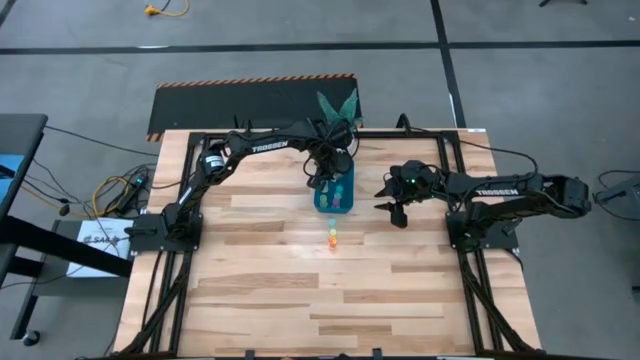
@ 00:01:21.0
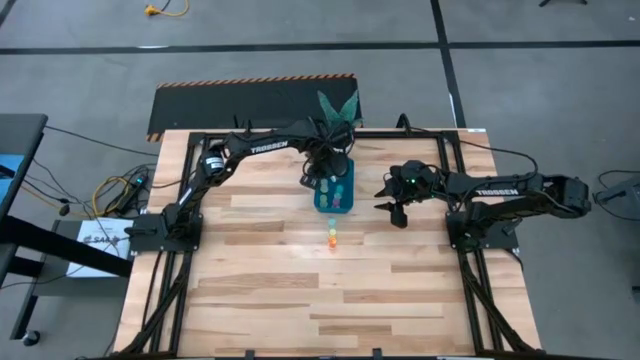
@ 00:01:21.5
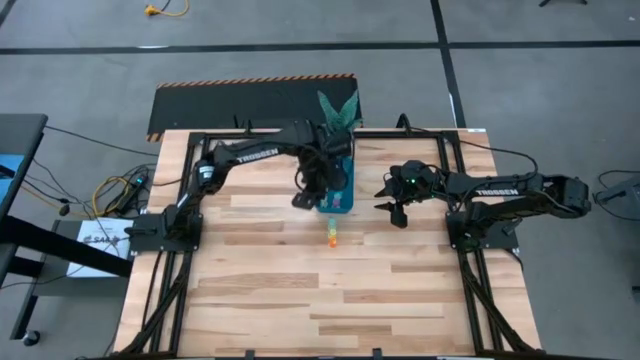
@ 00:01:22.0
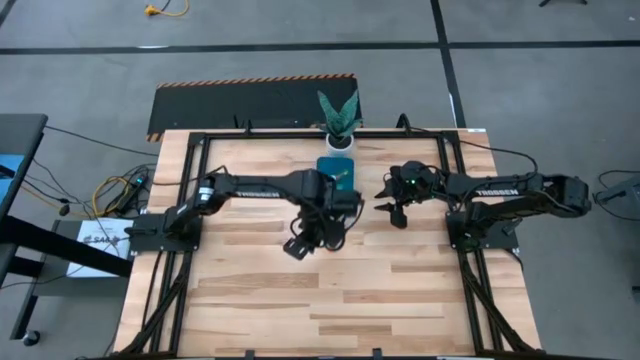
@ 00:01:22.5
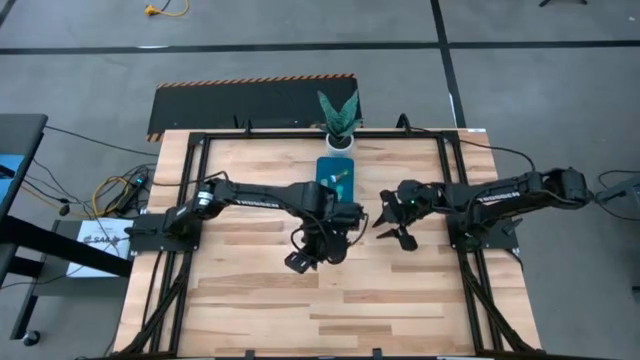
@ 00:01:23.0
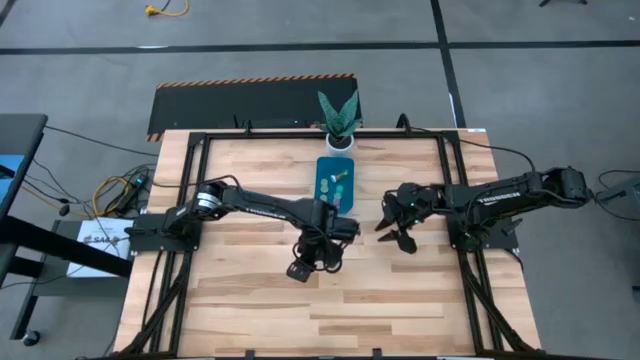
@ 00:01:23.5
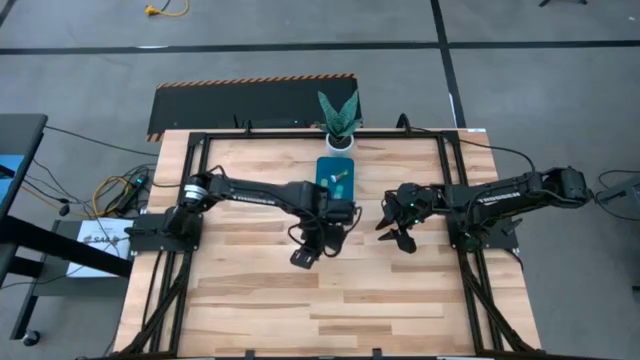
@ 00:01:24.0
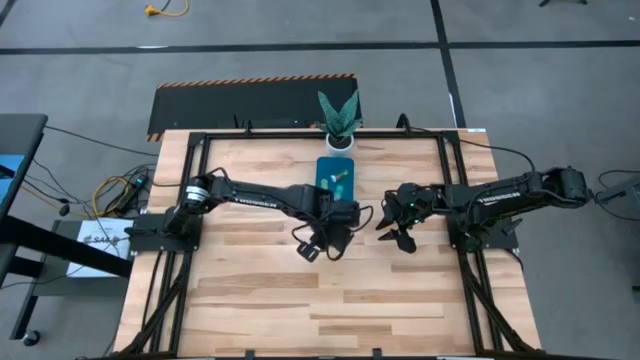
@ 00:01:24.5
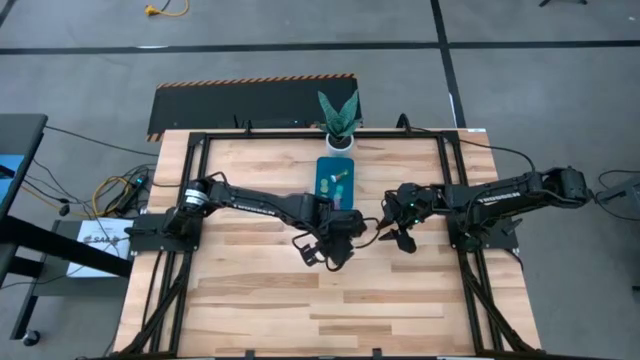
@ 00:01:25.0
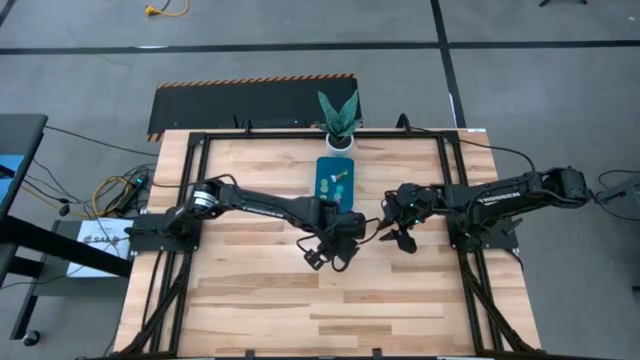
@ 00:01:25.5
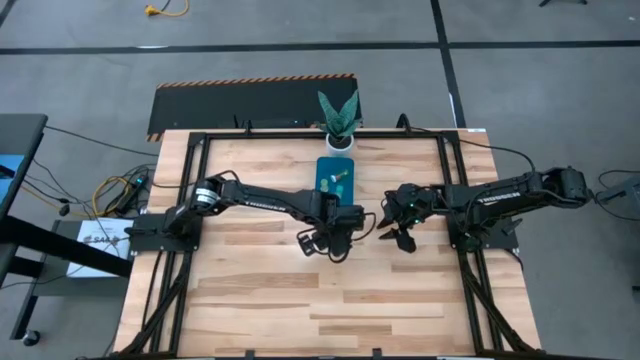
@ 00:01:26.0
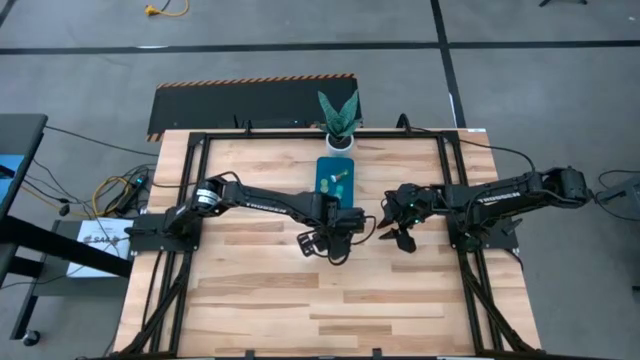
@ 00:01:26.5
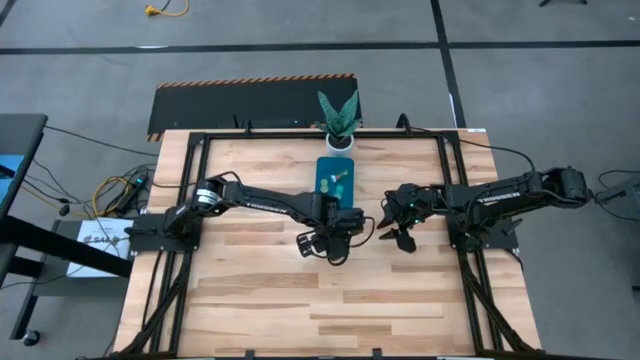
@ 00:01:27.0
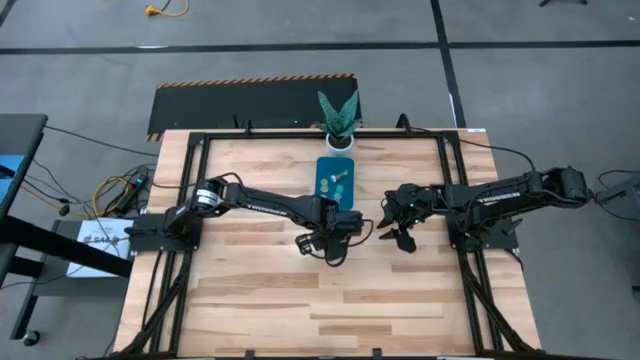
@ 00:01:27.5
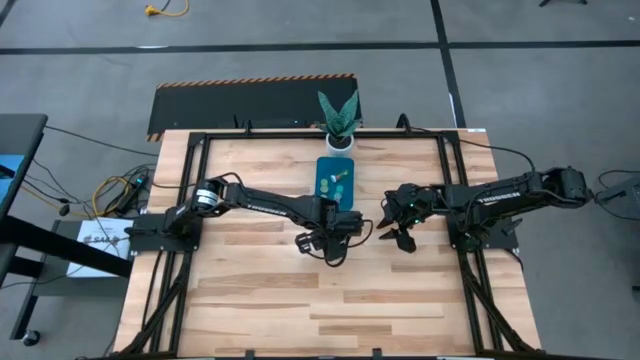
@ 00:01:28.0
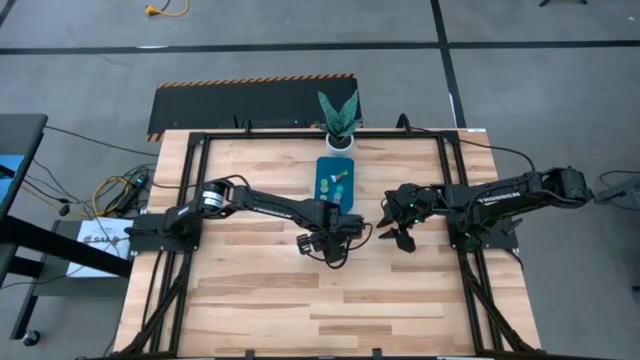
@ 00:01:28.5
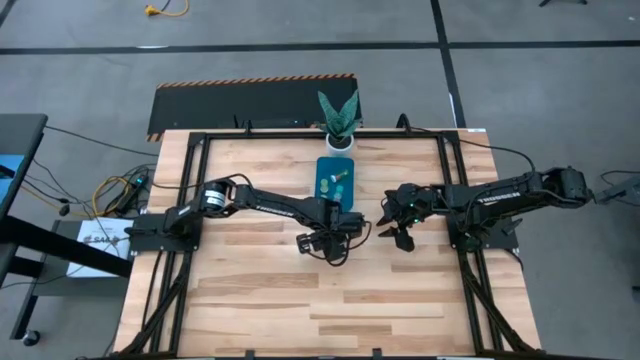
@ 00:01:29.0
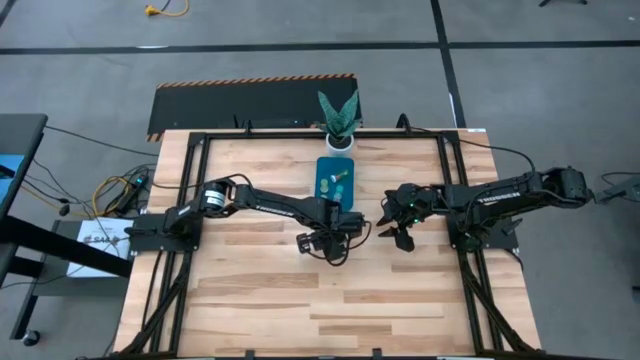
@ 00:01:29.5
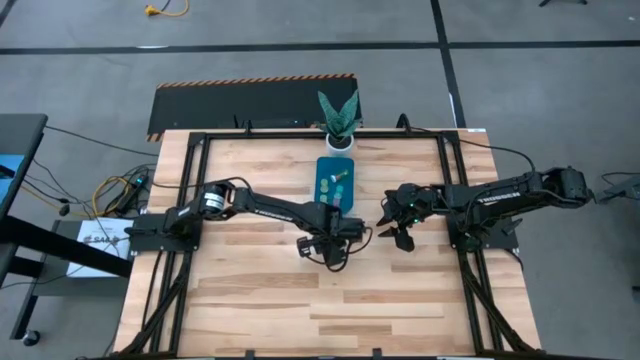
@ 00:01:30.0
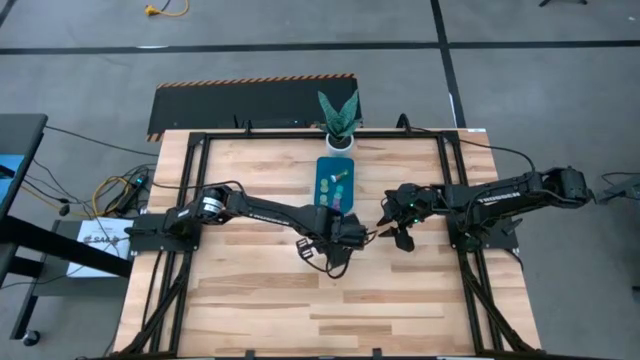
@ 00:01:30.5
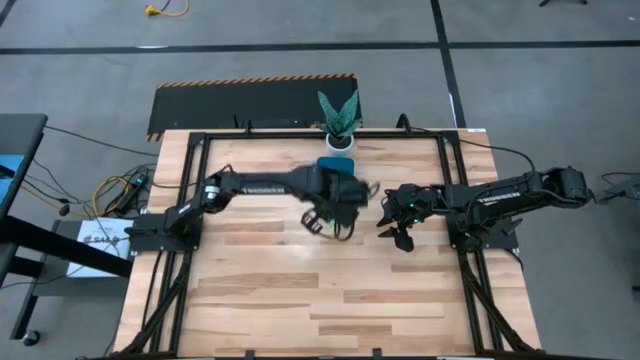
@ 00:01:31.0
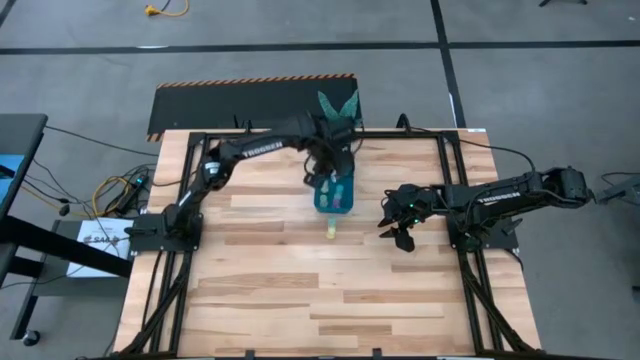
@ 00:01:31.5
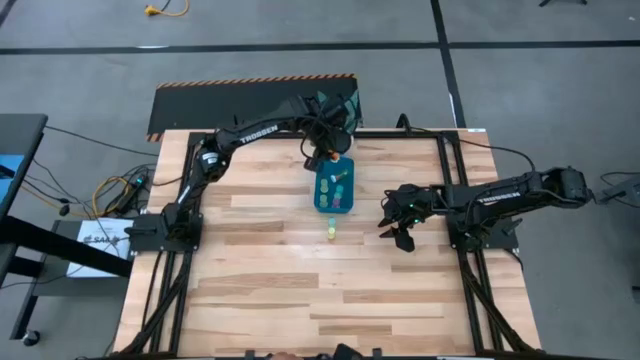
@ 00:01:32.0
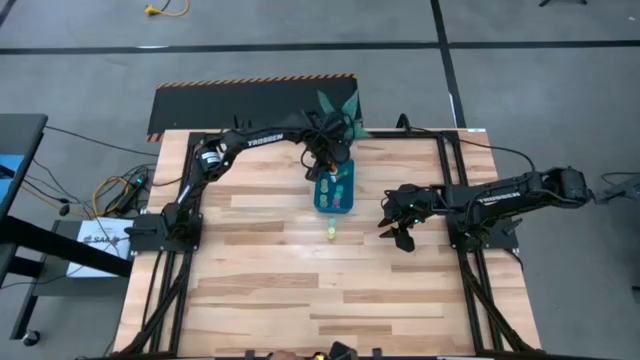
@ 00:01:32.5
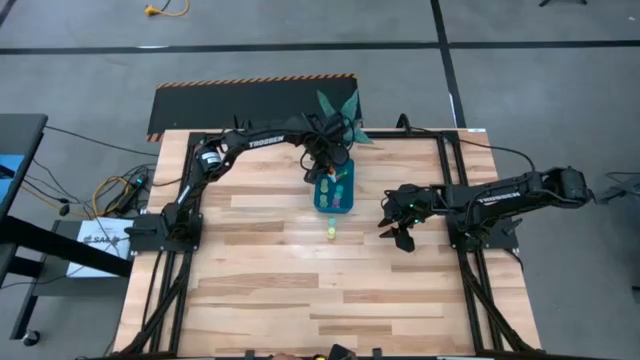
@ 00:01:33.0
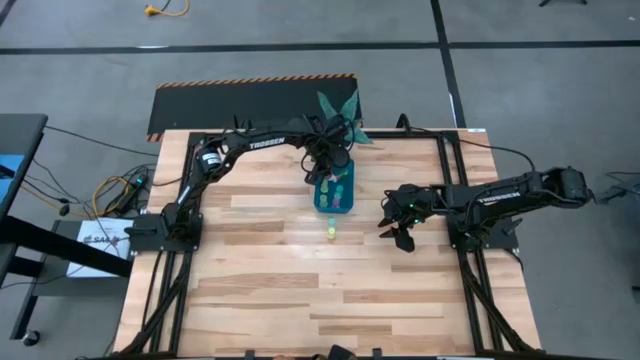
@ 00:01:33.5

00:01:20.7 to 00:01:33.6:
Task: Pick and place pill bottles into a basket
Put the orange pill bottle into the blue bin

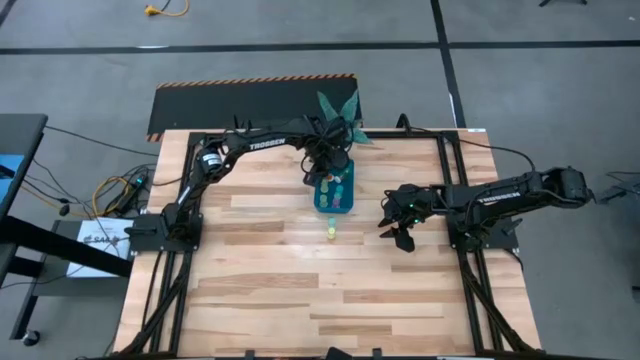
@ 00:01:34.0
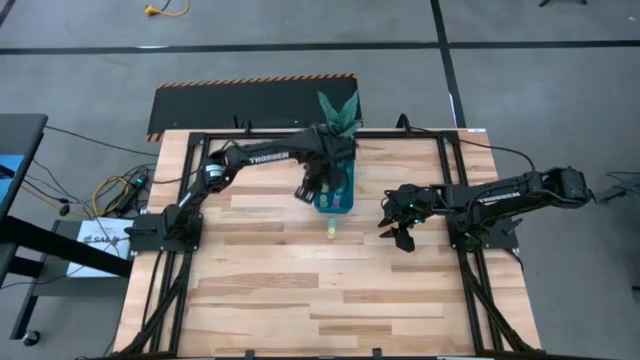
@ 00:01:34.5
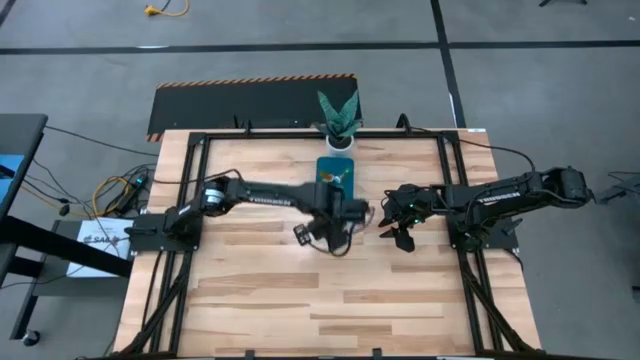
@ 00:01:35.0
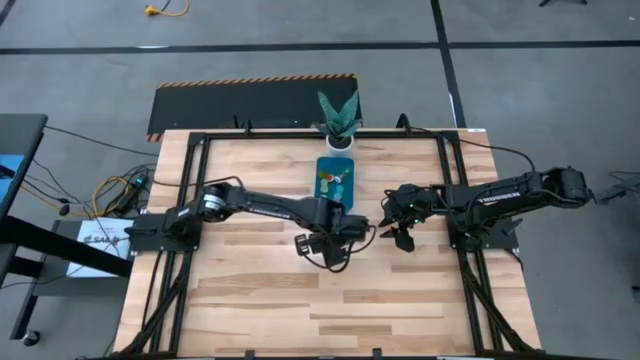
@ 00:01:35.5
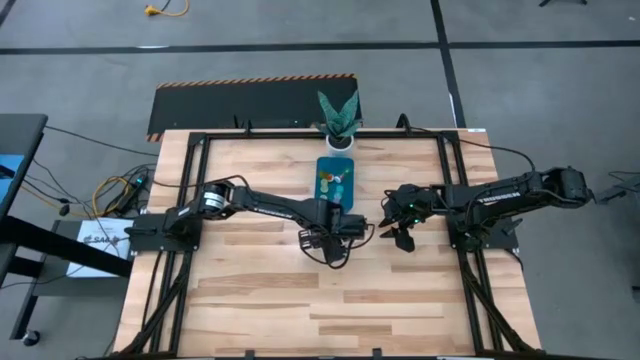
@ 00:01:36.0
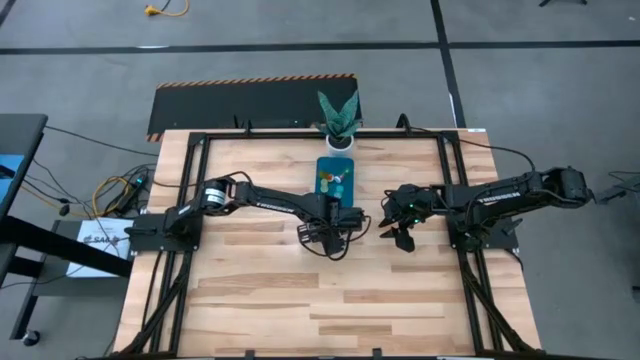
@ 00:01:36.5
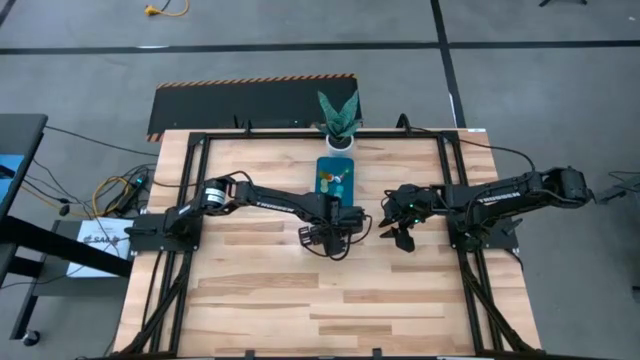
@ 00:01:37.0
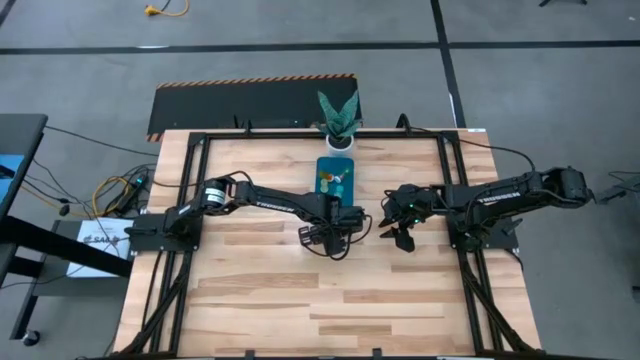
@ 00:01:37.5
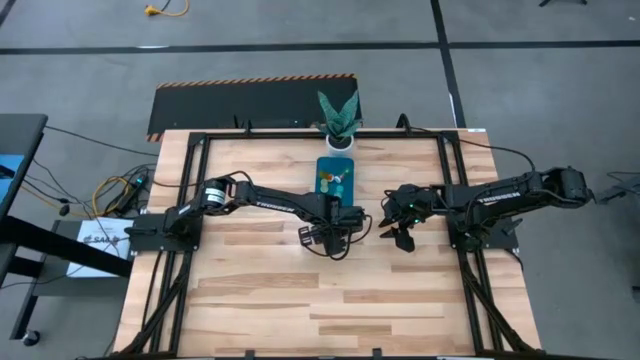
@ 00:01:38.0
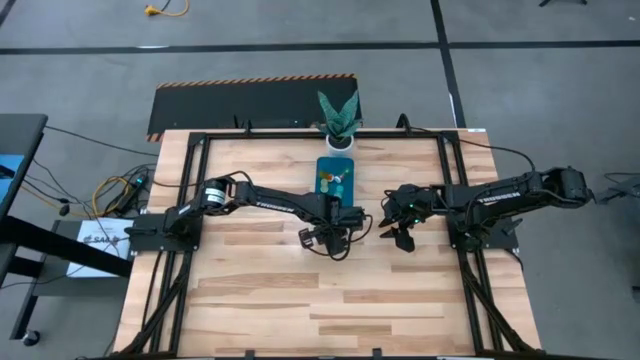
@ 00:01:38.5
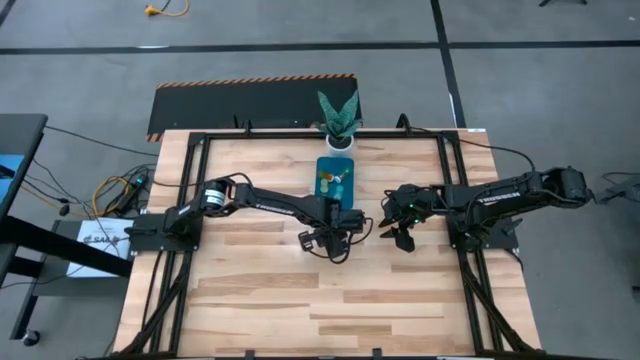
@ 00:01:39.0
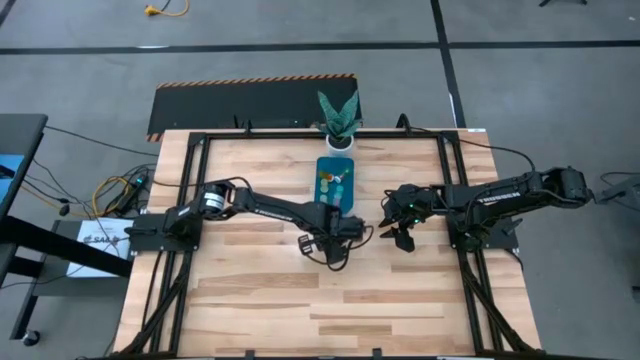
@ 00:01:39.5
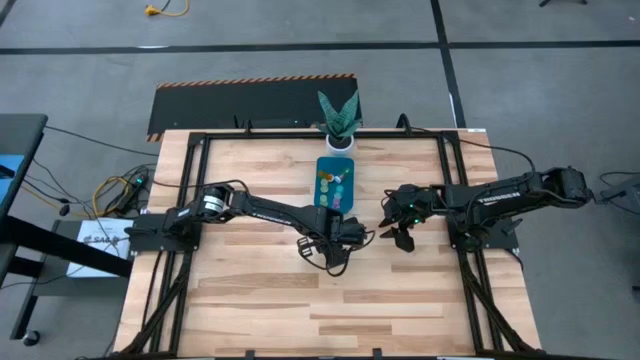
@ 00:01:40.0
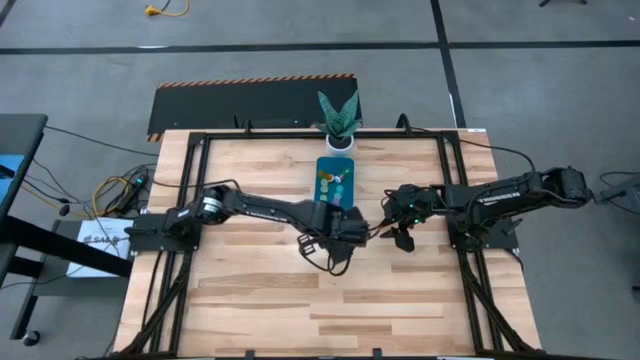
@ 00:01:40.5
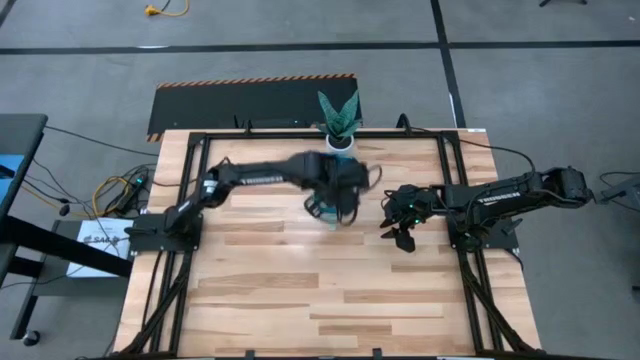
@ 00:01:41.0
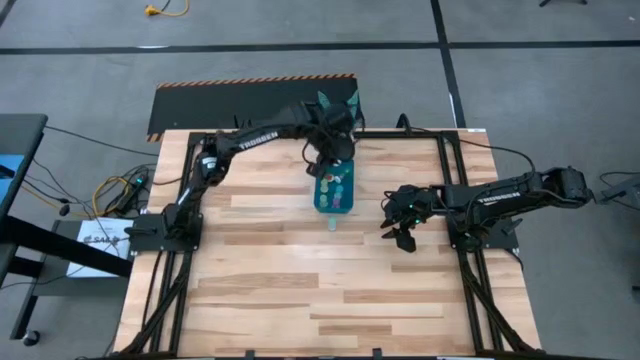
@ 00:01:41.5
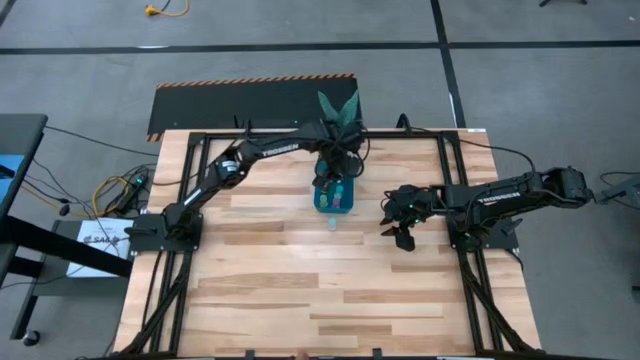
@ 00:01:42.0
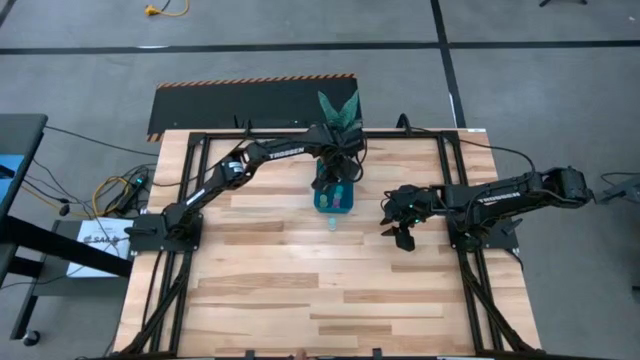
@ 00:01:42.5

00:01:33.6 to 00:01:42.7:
Put the yellow pill bottle into the blue bin
